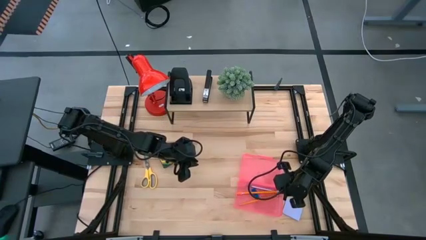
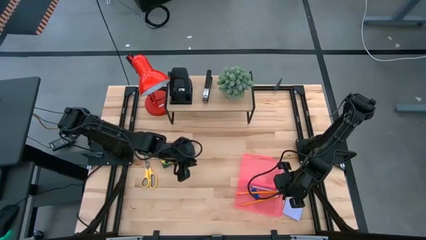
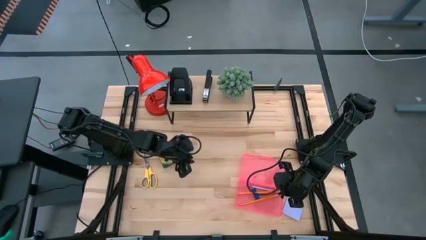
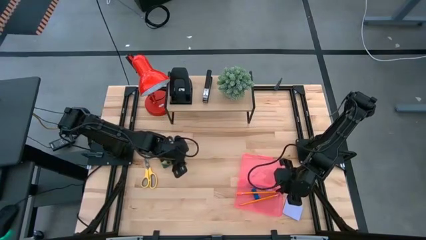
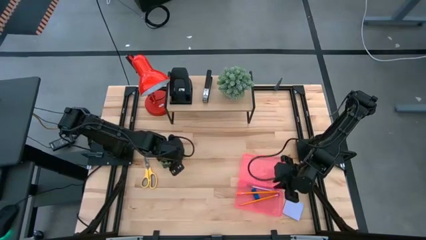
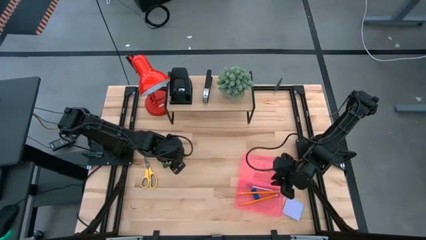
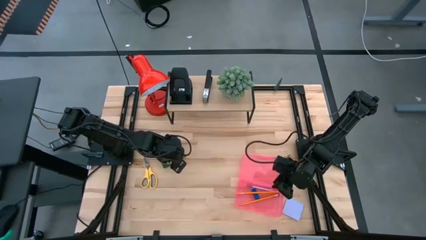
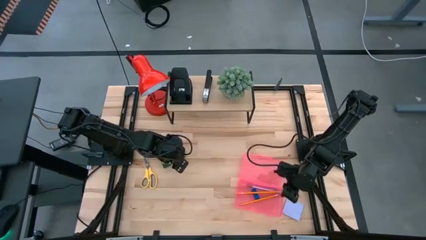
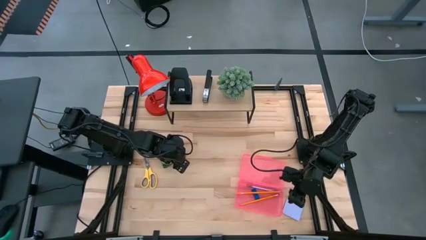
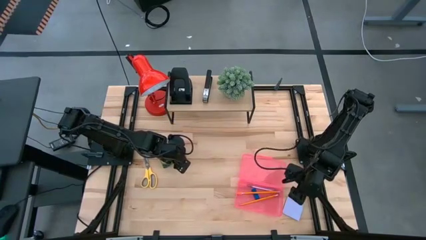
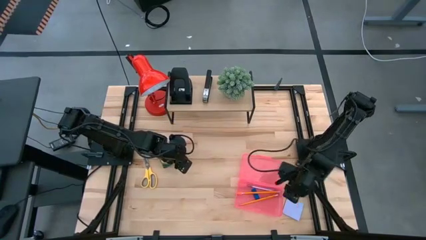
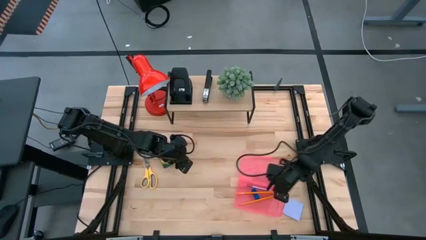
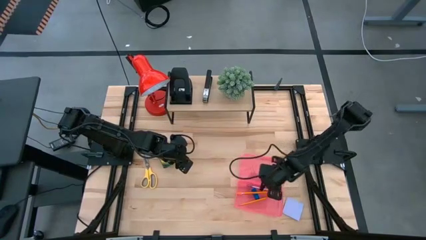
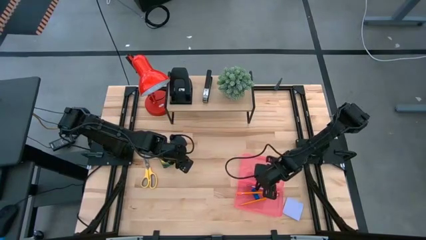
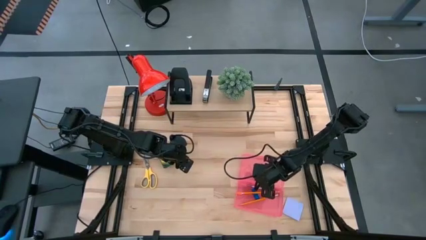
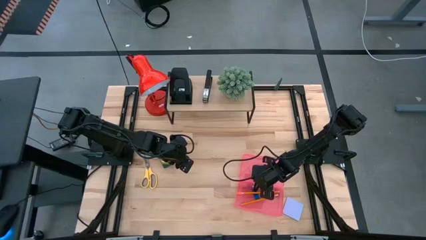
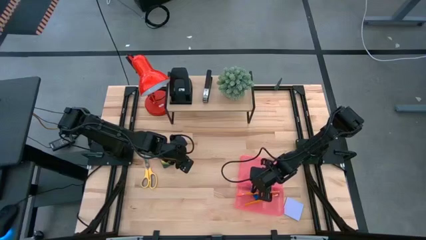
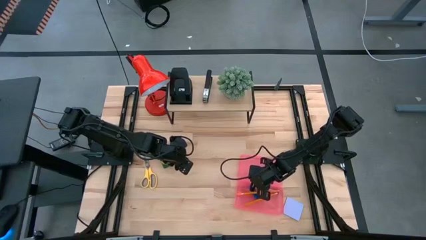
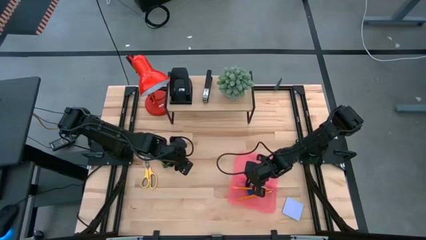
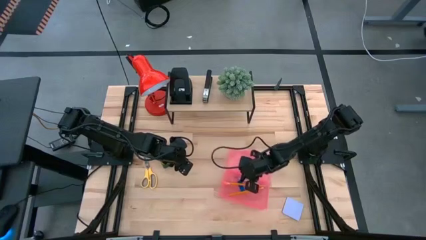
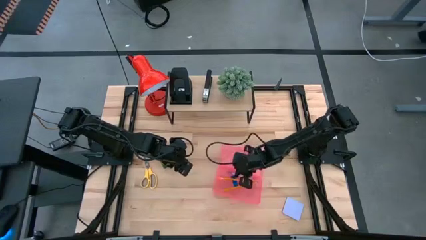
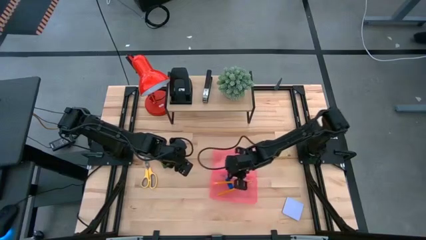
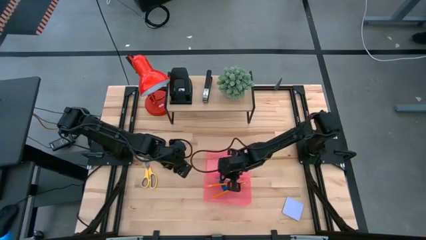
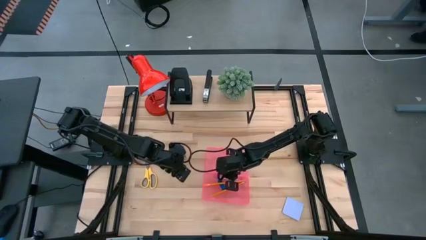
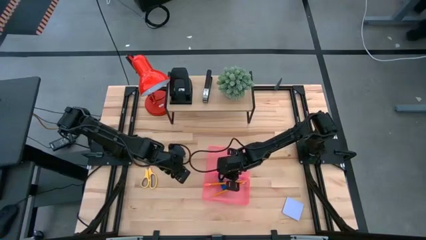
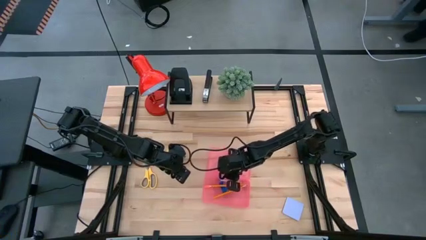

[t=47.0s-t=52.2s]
Task: Pack school essentials
Move the pink supply box to the bottom center of the table

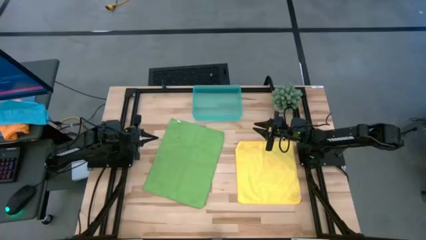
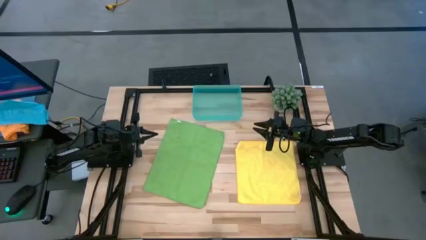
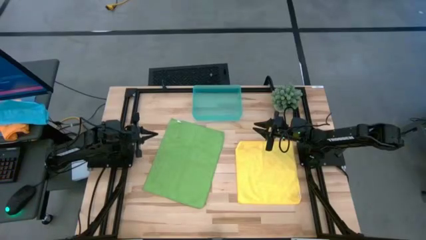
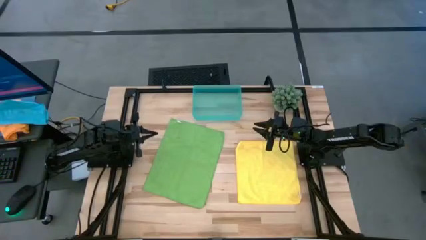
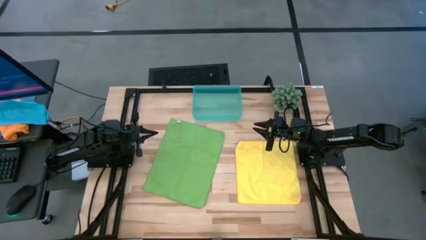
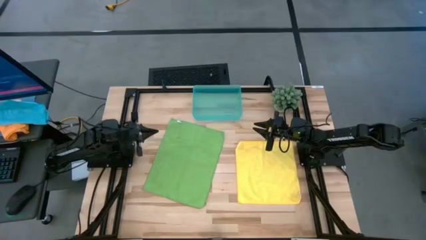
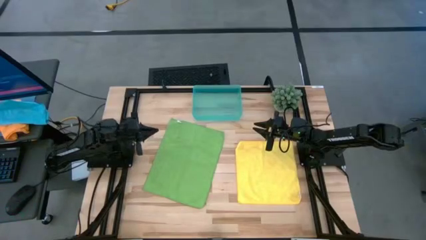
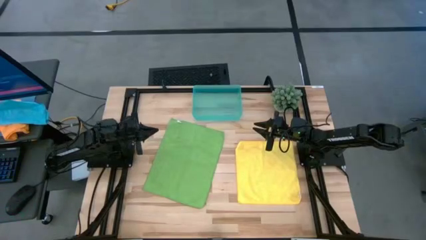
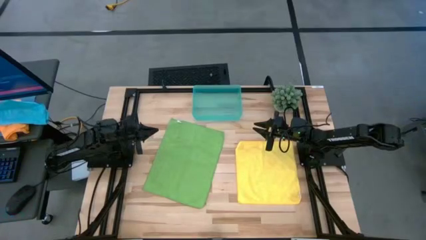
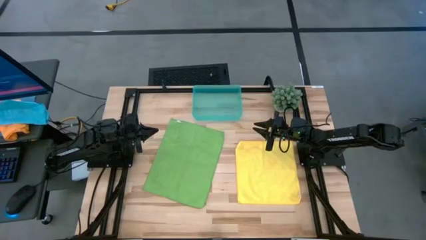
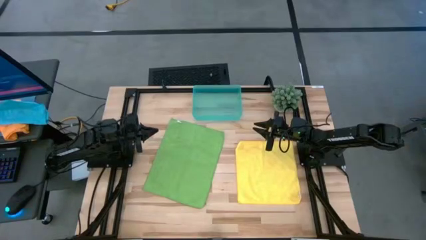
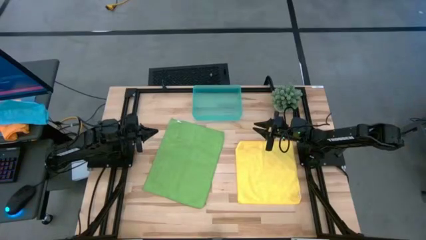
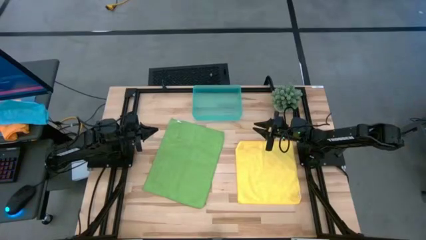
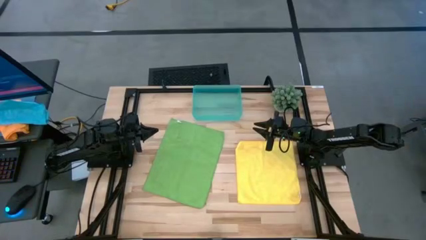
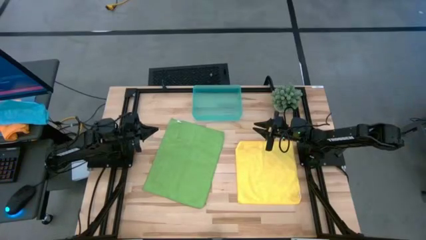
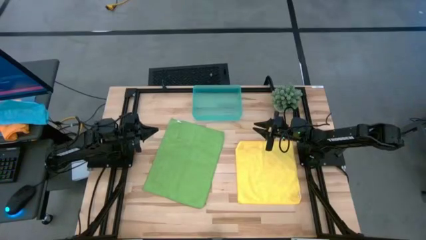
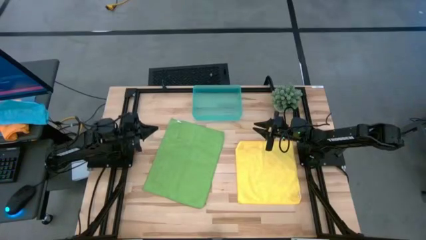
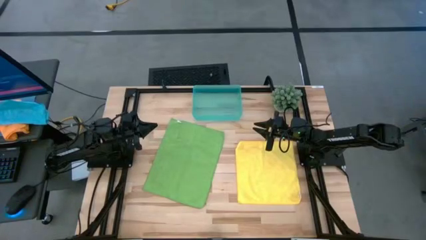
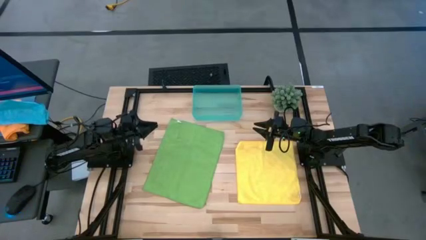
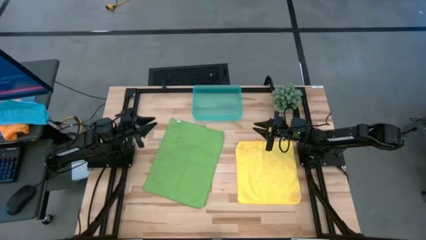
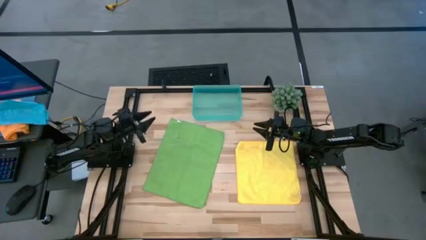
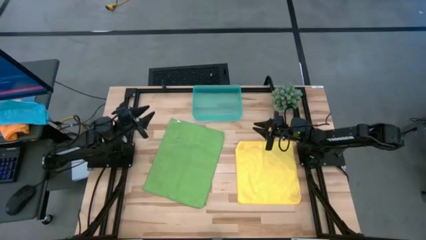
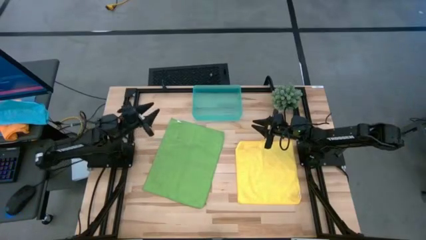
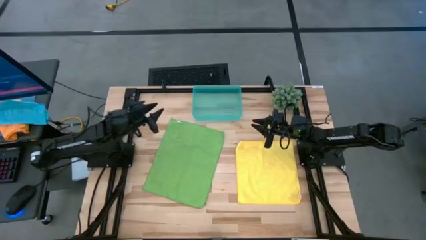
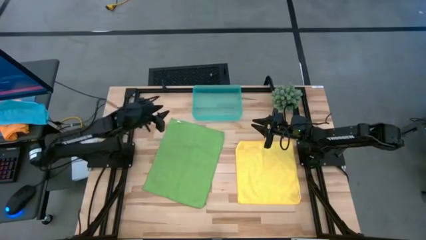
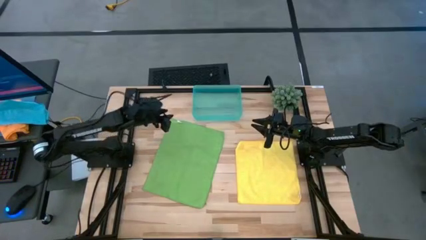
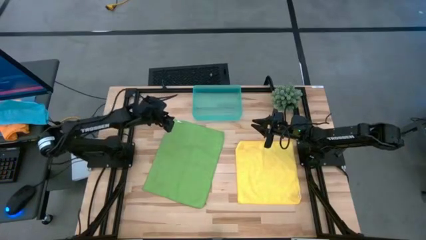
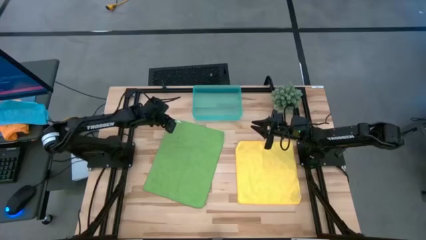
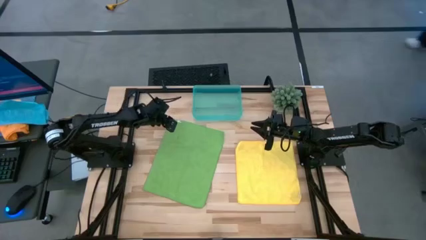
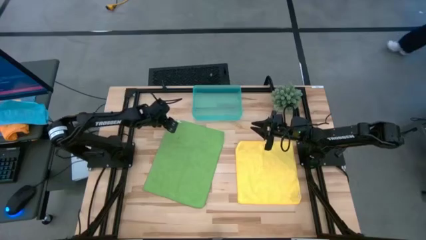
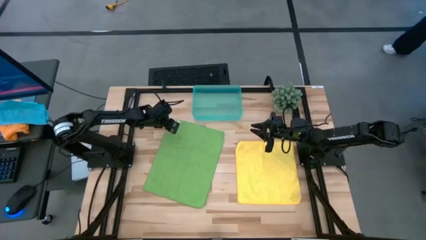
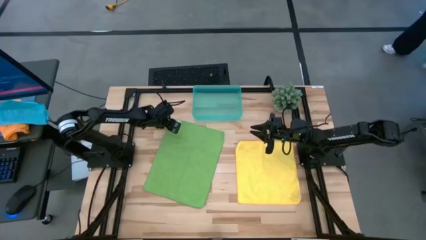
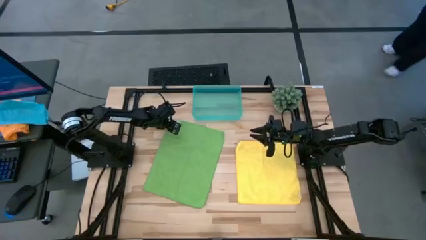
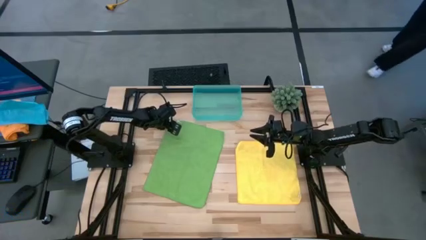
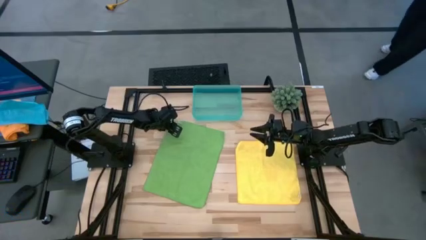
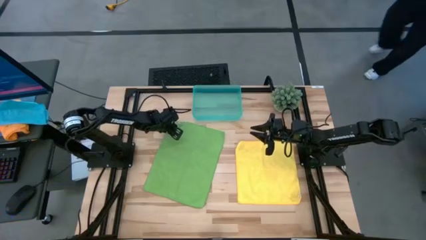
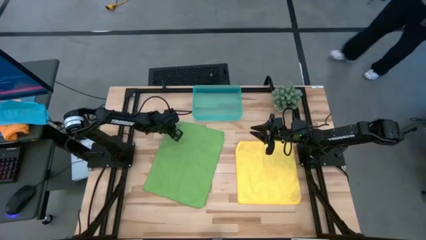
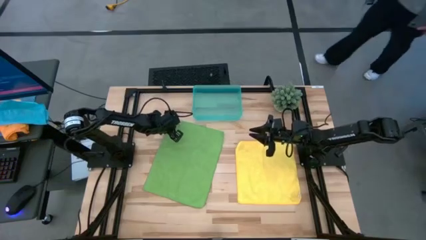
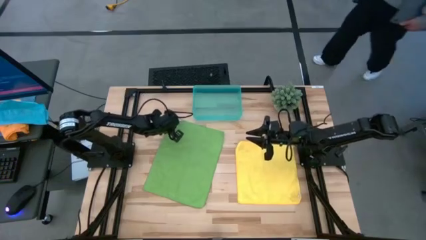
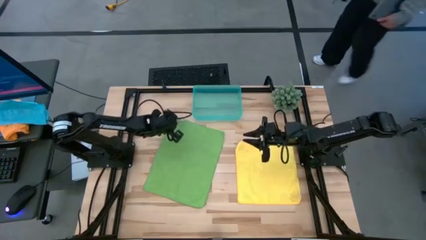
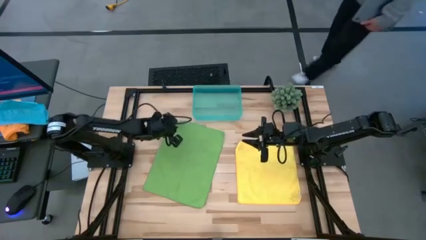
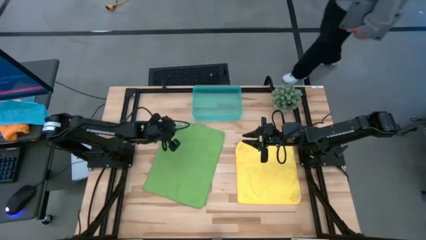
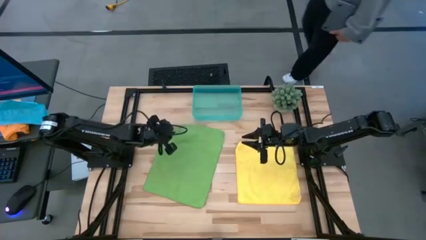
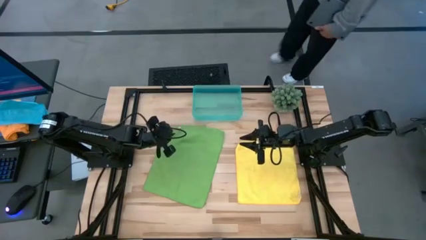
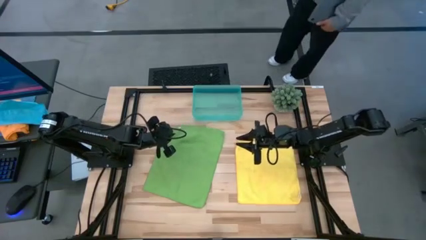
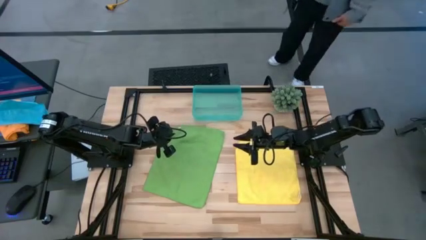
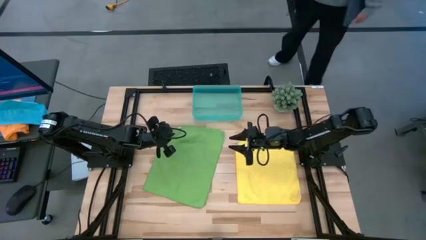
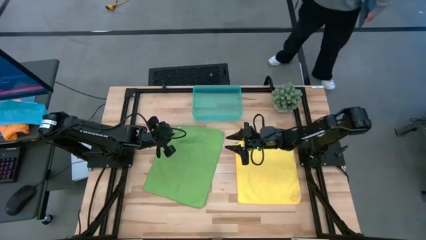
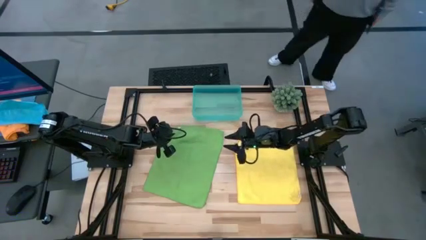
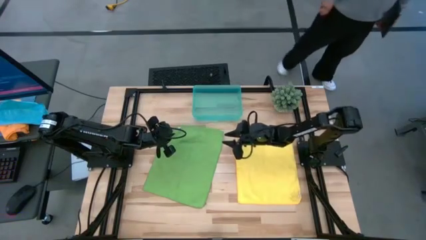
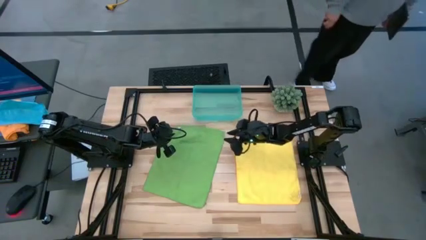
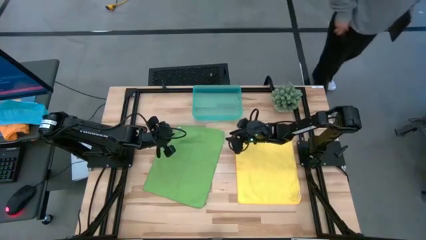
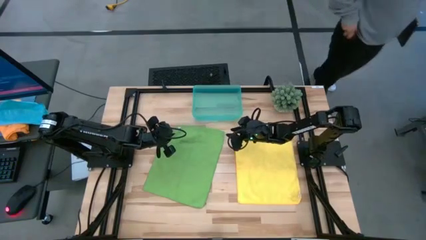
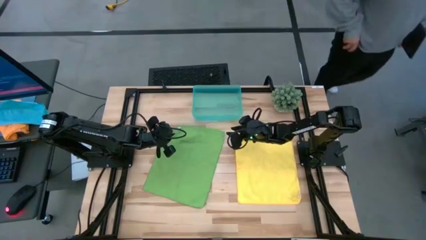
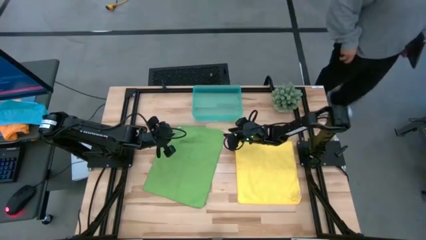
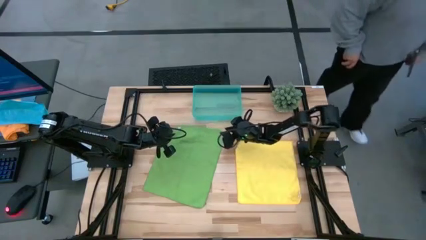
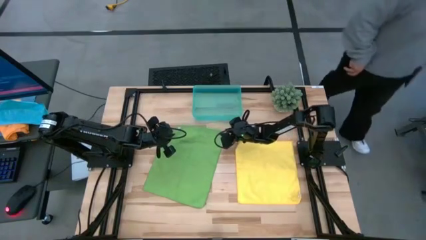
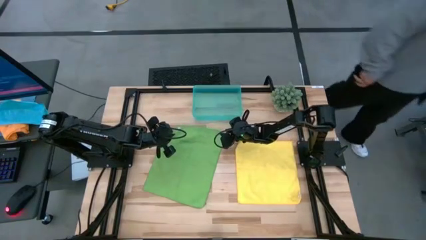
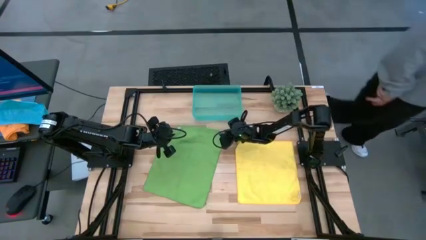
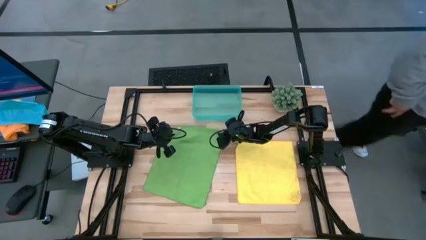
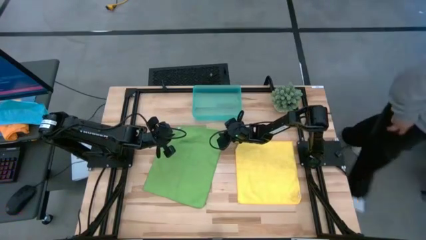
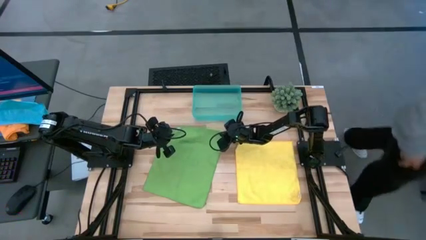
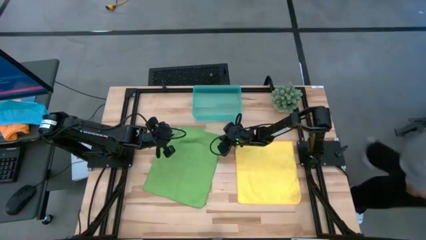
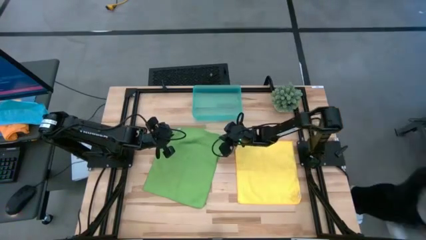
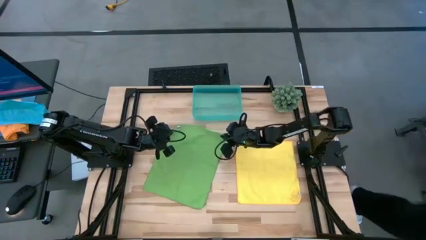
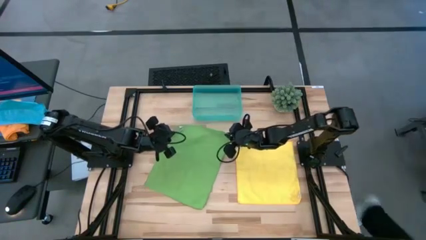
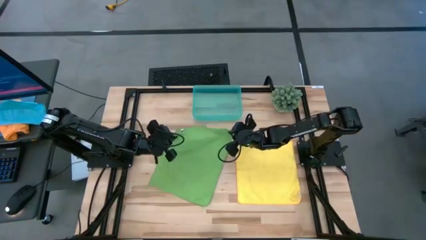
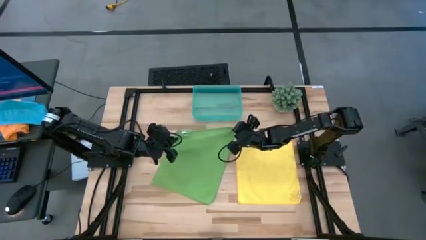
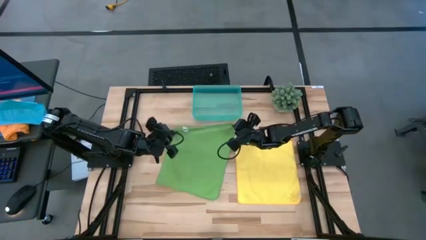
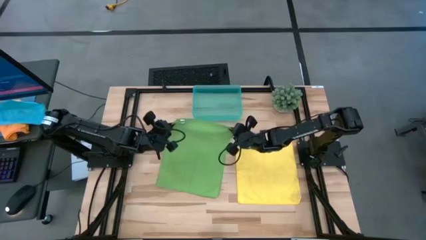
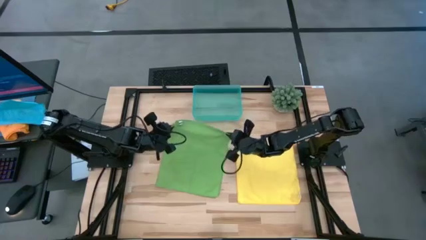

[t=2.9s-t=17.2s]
Task: Roll microfiber towels into tight, uniform cylinder then place into a basket
Fold the green towel
